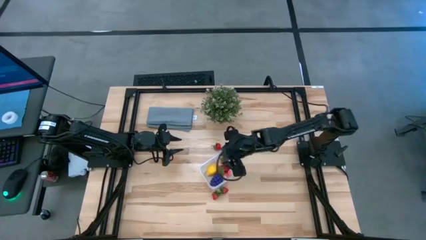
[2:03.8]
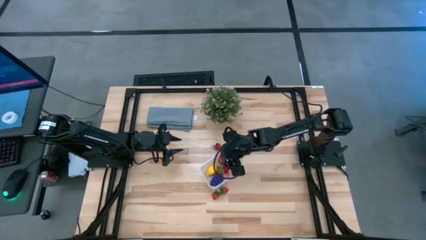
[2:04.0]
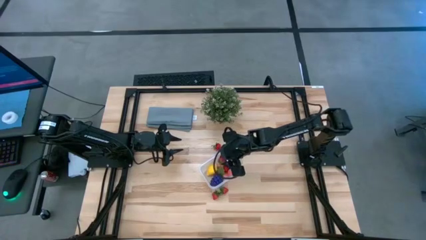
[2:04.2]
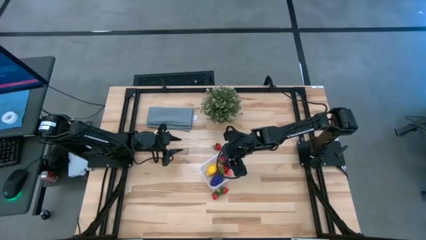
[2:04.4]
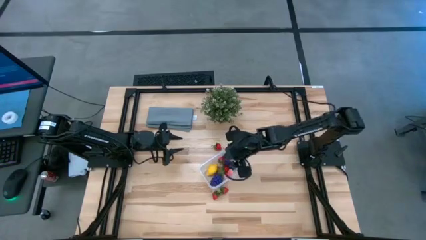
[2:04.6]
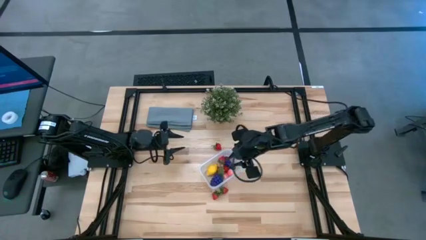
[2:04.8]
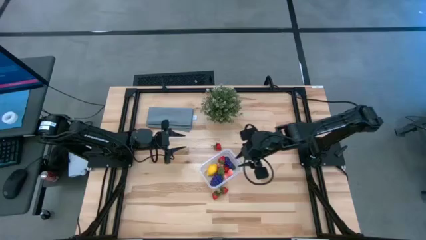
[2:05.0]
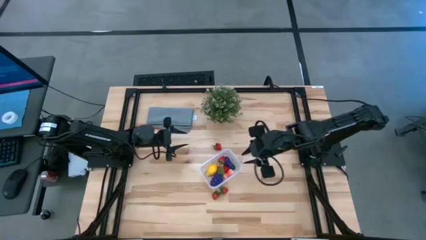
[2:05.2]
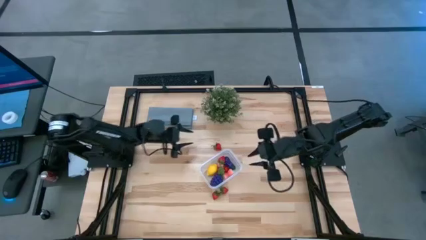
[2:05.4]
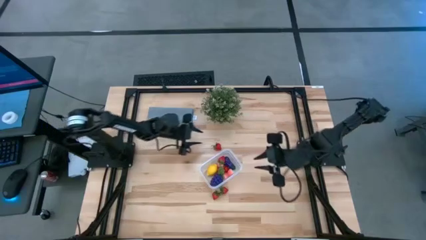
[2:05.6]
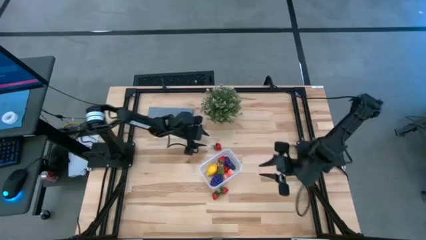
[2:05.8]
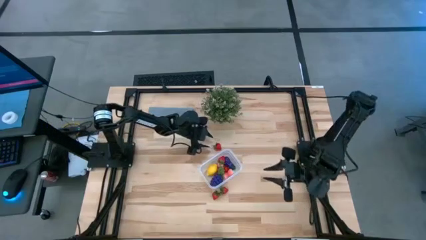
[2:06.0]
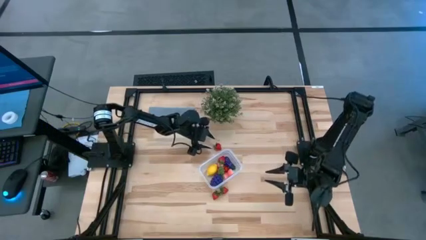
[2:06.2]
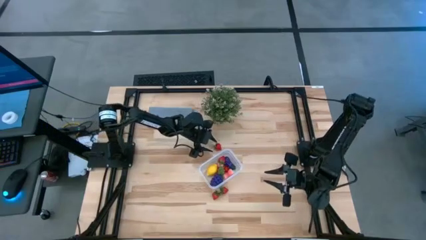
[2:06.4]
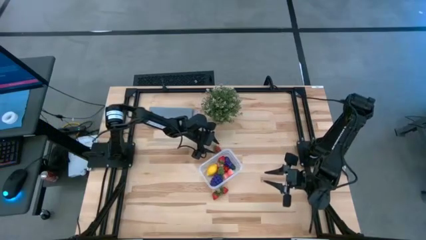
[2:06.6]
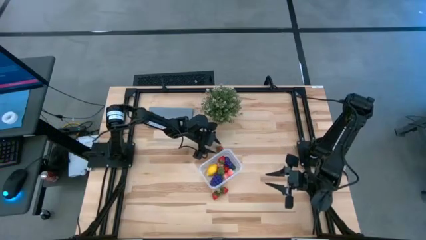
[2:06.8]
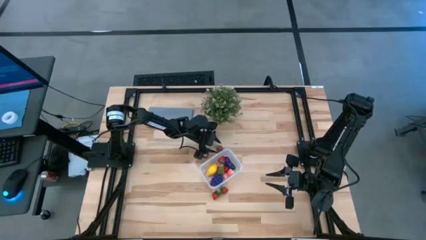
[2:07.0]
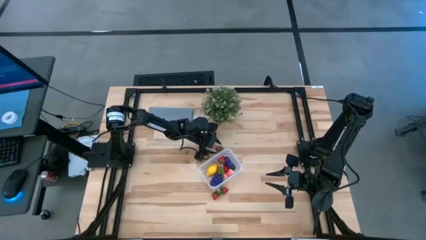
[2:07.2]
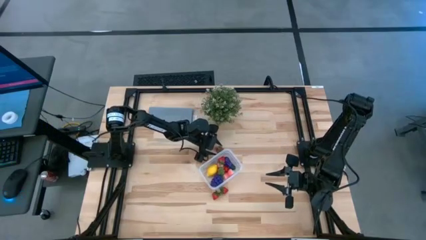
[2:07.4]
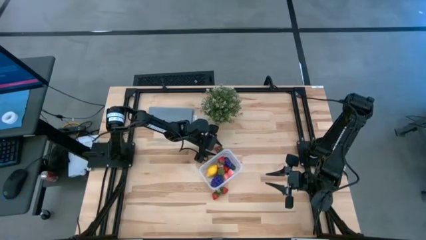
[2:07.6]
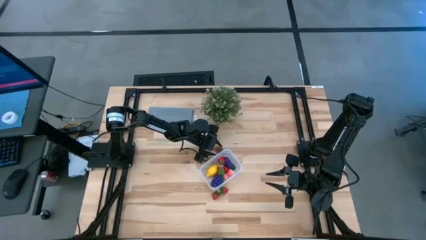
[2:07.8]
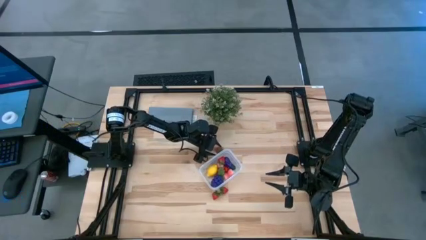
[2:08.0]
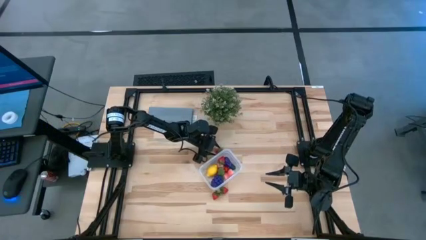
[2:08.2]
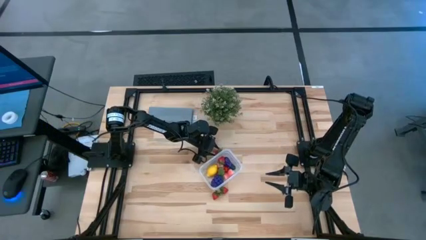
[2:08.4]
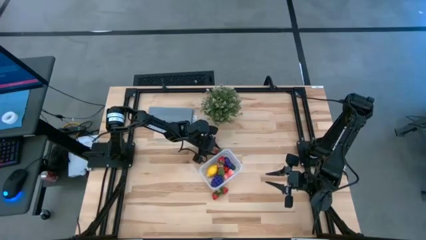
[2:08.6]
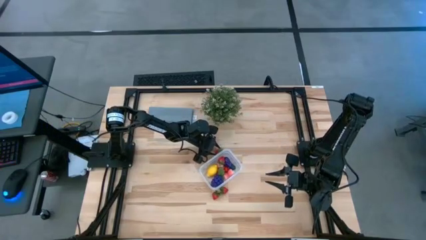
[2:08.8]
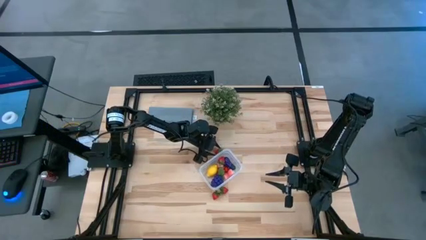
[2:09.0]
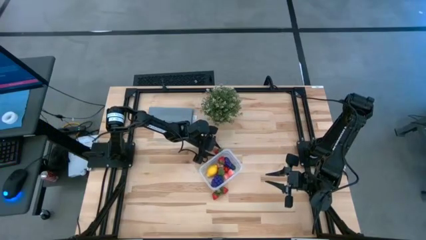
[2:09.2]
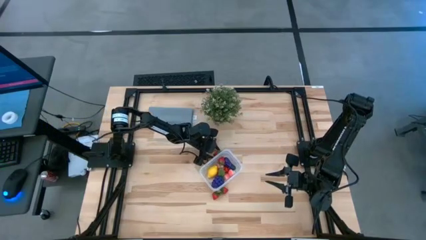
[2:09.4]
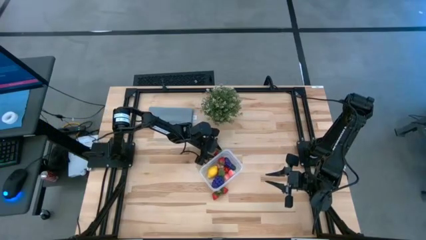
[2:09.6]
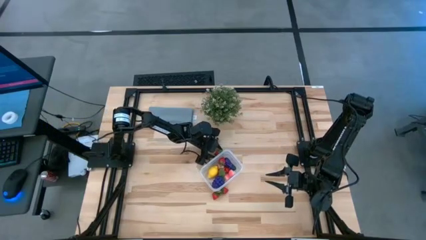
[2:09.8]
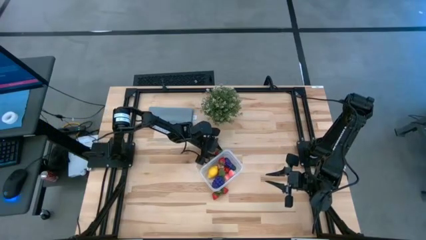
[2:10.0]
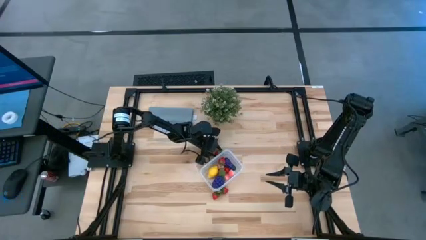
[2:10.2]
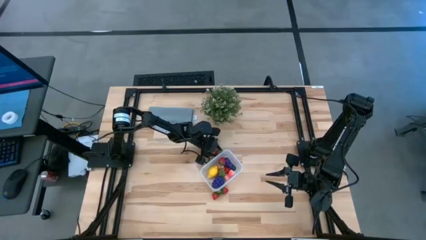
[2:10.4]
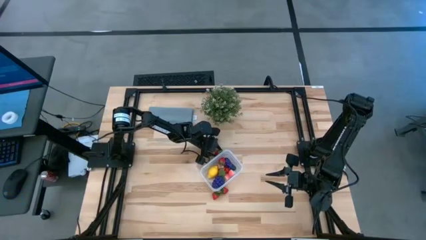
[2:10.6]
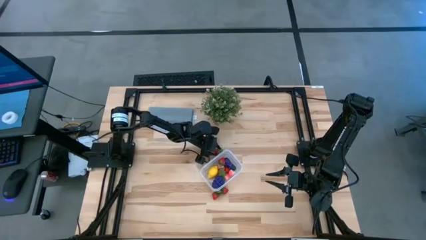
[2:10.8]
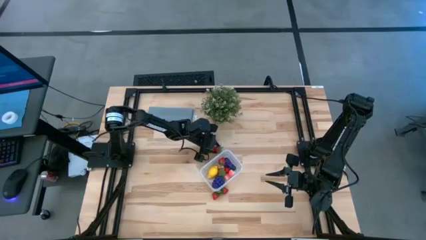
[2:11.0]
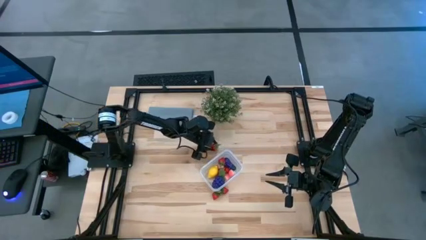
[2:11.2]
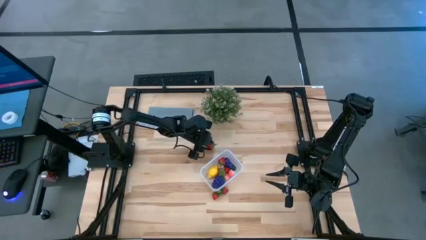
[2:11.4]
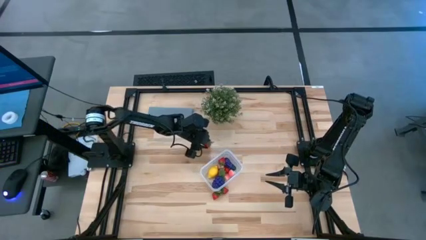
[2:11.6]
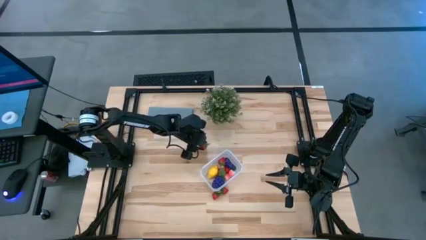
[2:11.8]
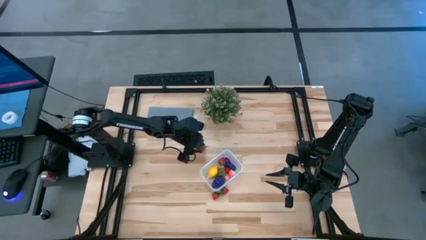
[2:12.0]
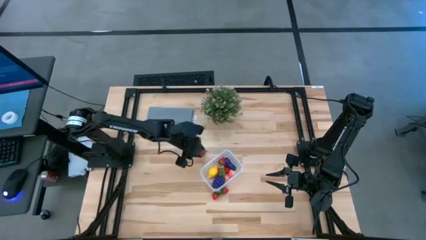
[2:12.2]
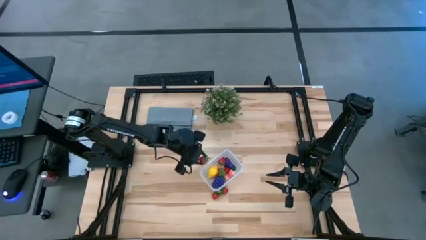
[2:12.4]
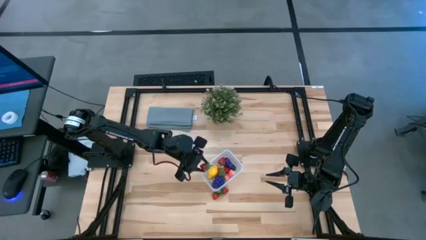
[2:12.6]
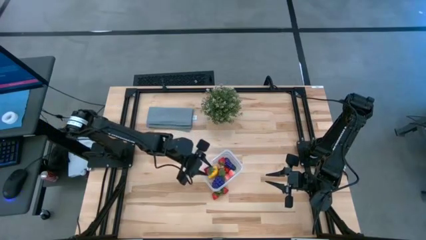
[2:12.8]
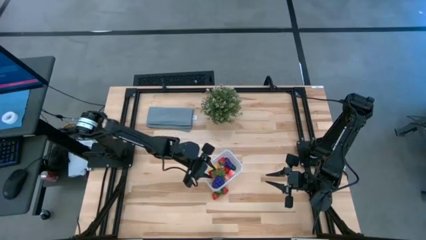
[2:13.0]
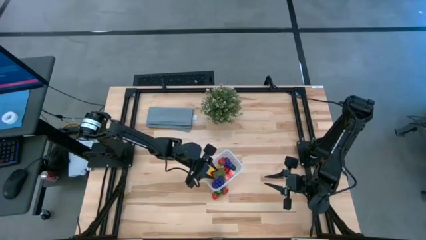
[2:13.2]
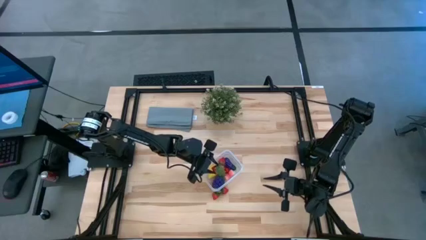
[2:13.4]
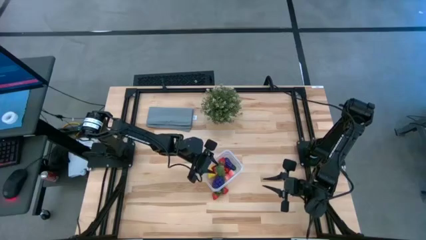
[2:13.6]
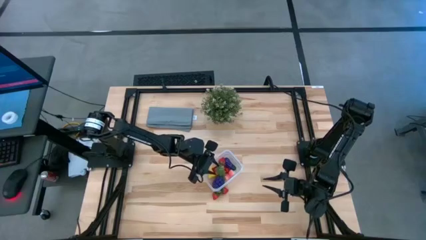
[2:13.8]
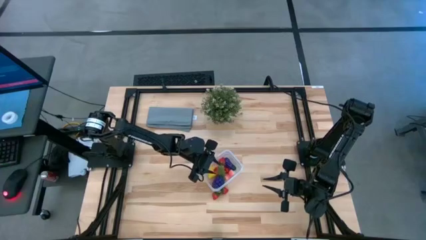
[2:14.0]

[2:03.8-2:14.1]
Task: Pick and placing Produce into tupperware
Put the red strawberry into the transparent bin
